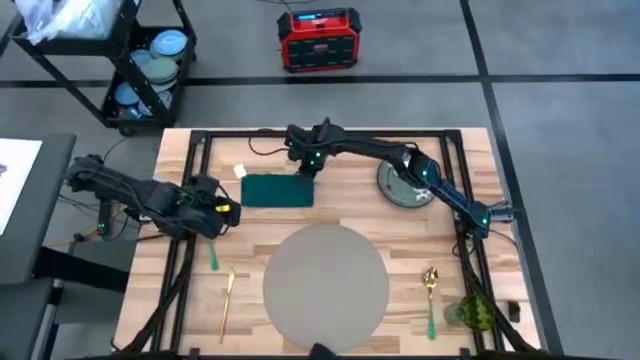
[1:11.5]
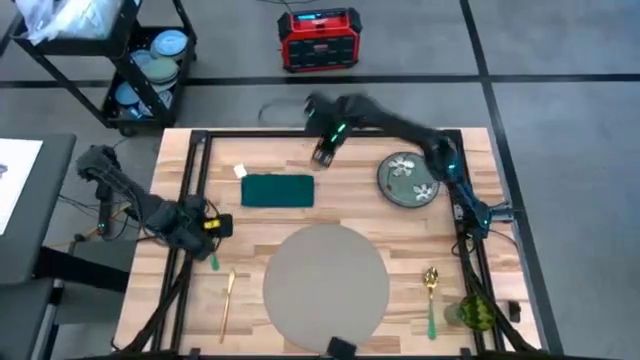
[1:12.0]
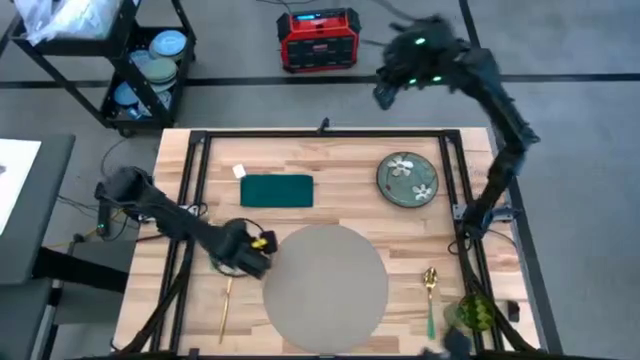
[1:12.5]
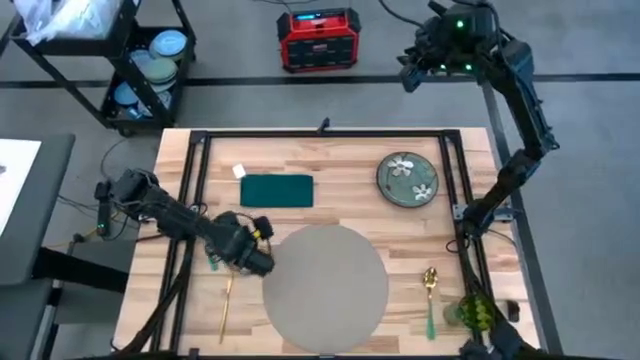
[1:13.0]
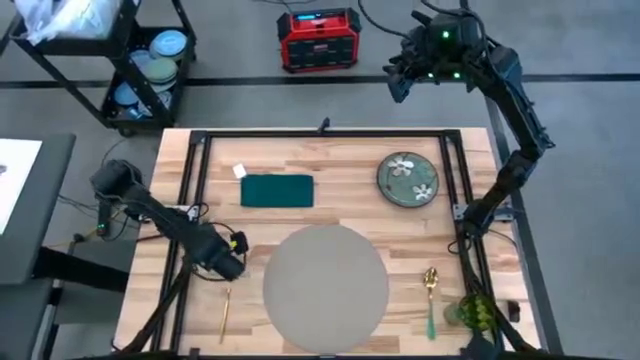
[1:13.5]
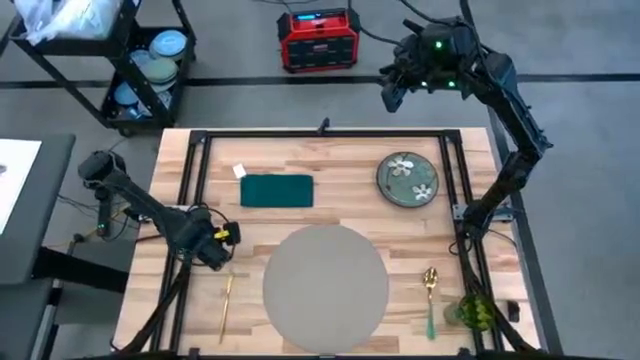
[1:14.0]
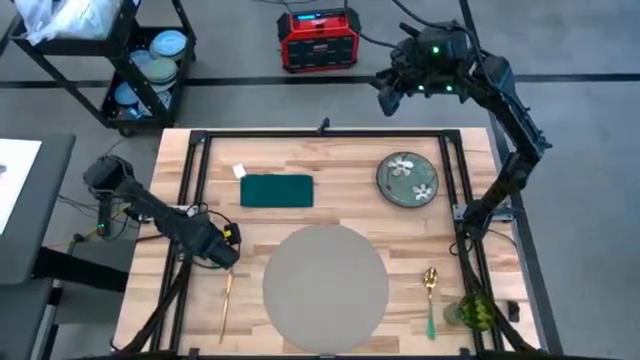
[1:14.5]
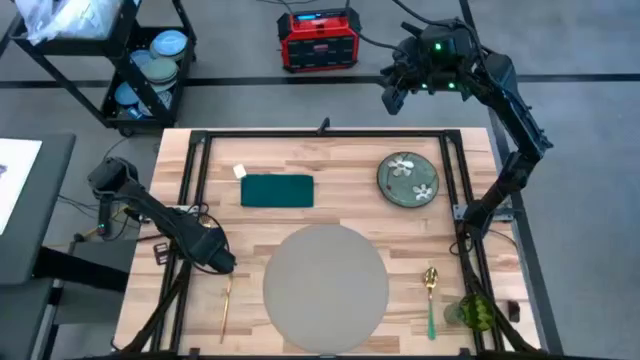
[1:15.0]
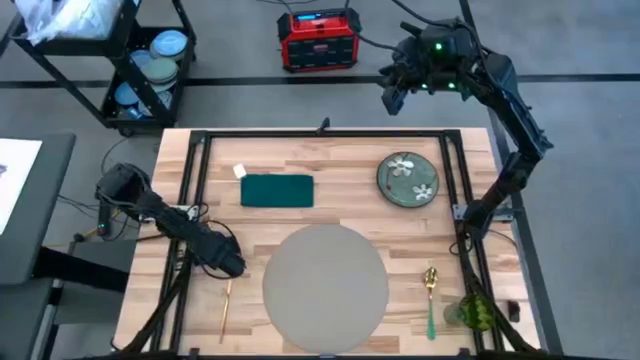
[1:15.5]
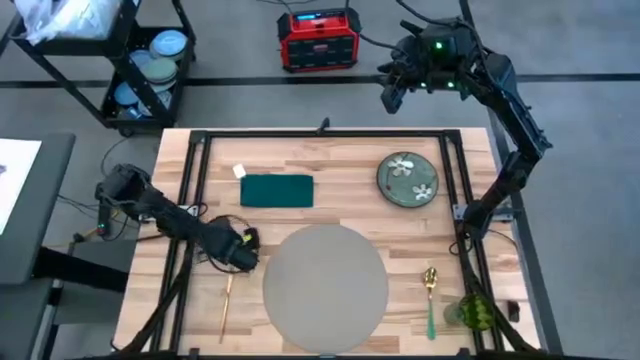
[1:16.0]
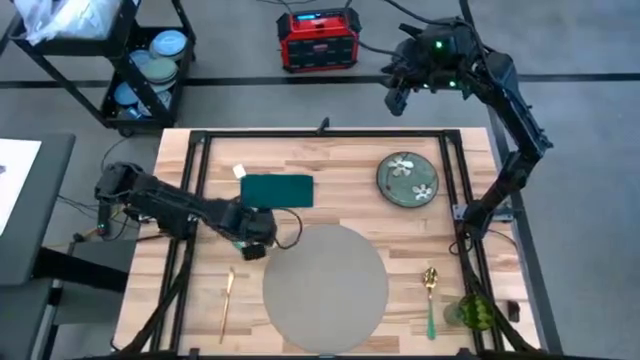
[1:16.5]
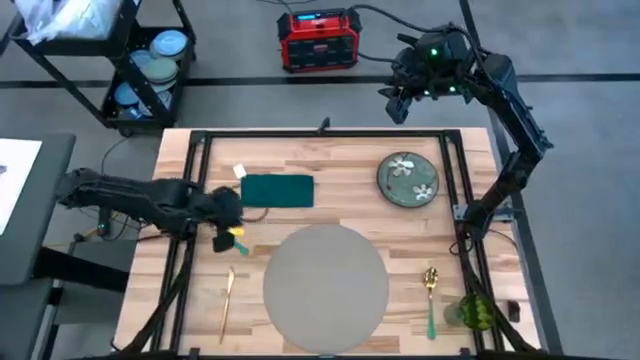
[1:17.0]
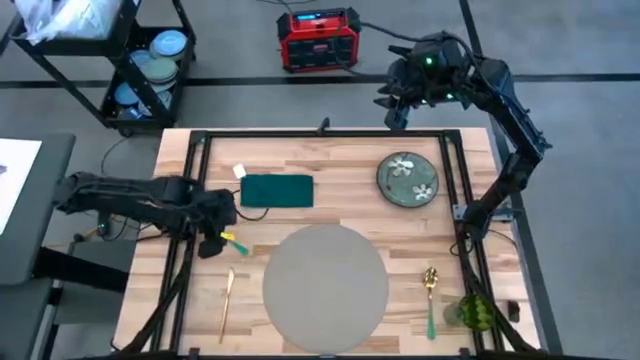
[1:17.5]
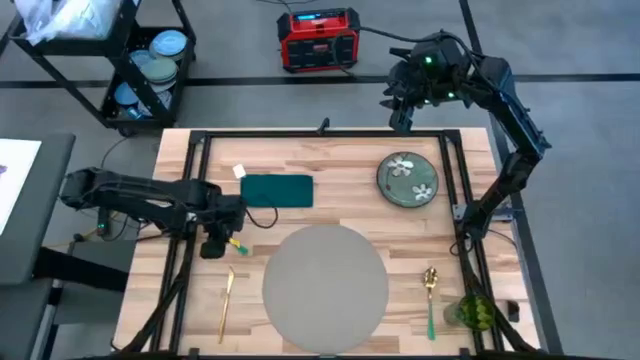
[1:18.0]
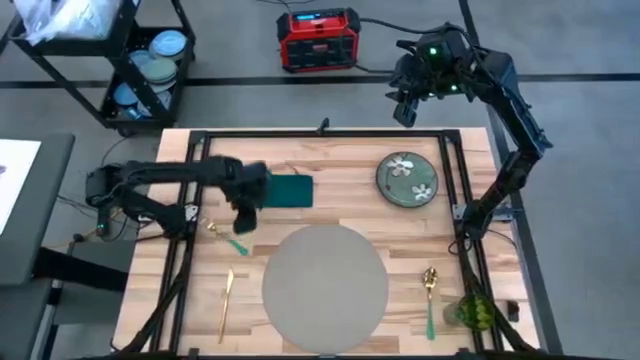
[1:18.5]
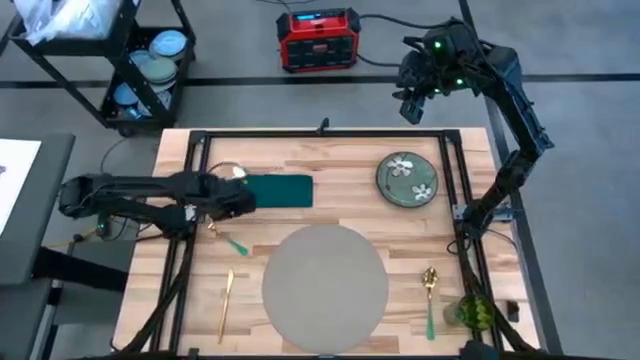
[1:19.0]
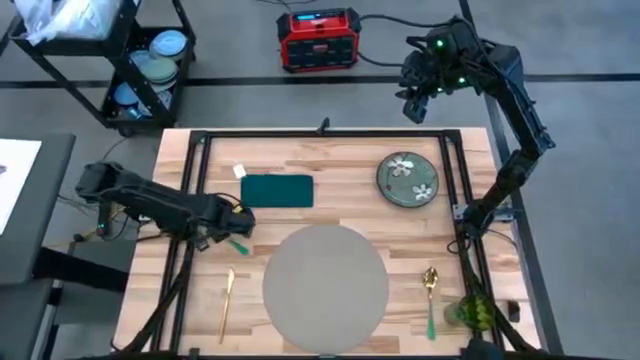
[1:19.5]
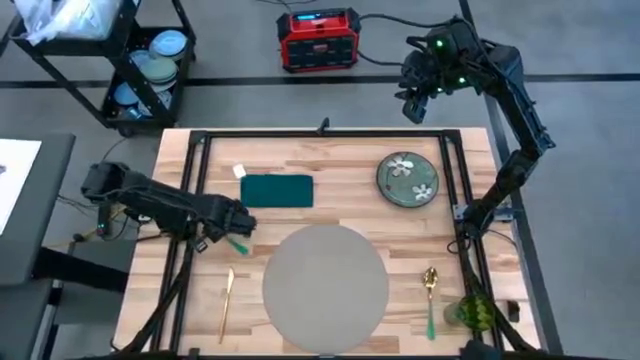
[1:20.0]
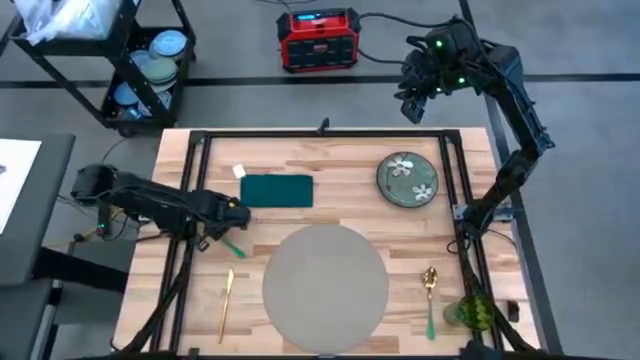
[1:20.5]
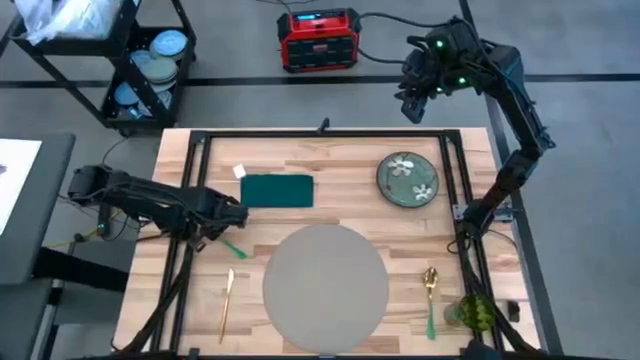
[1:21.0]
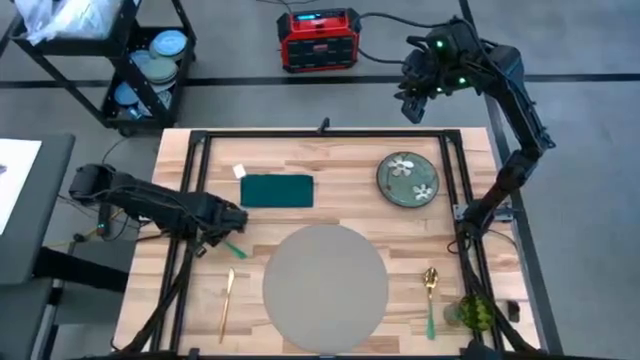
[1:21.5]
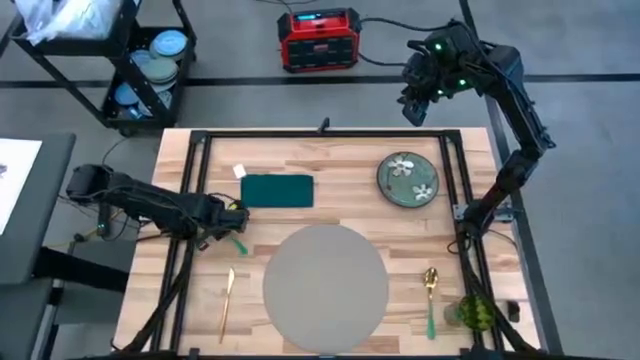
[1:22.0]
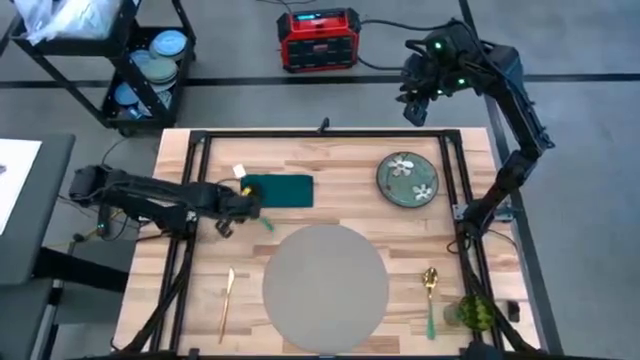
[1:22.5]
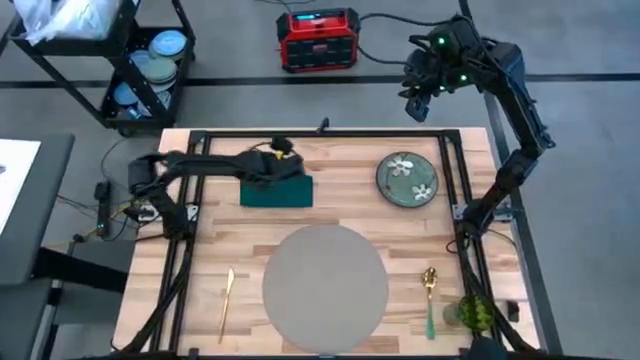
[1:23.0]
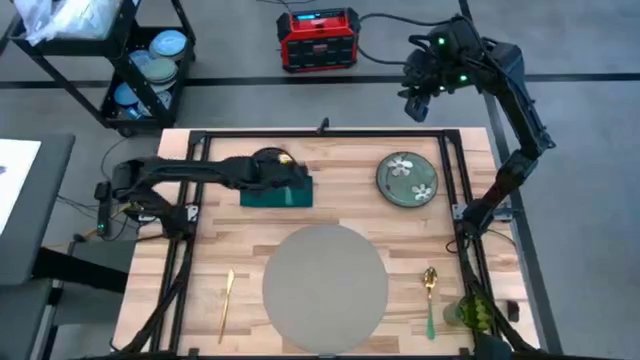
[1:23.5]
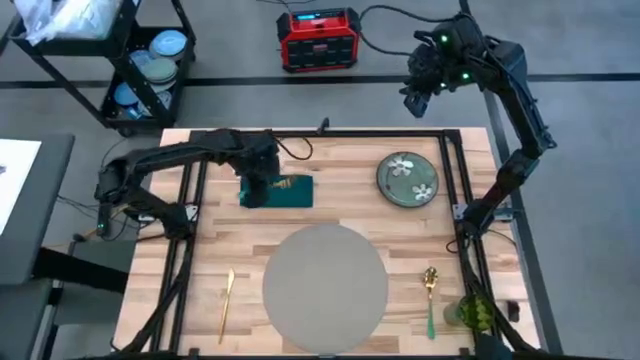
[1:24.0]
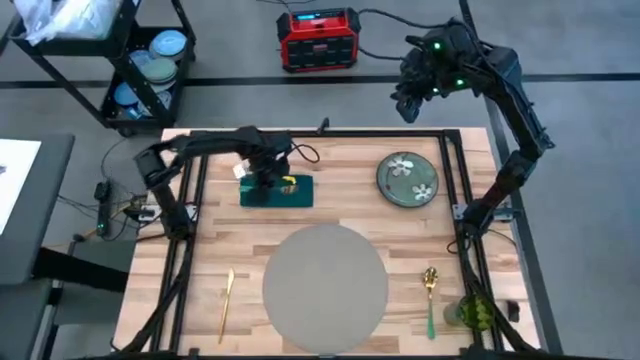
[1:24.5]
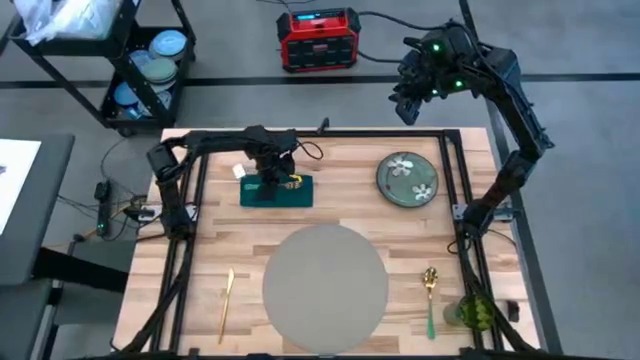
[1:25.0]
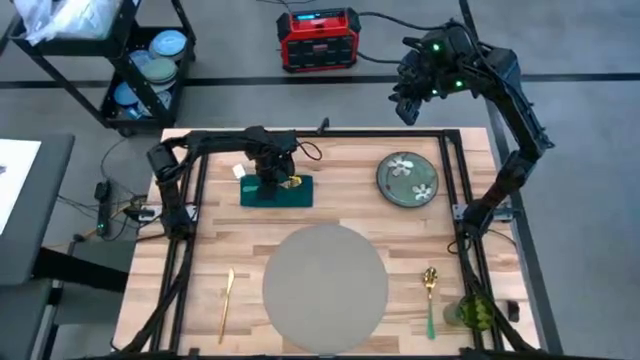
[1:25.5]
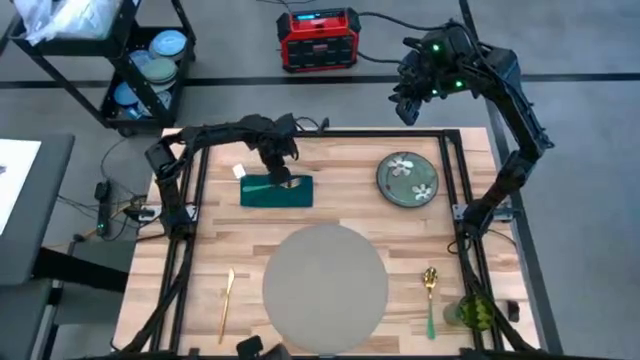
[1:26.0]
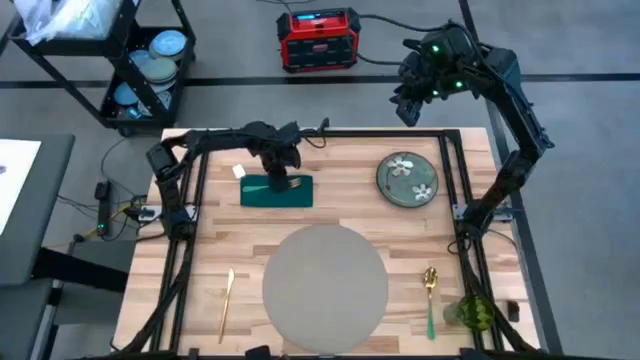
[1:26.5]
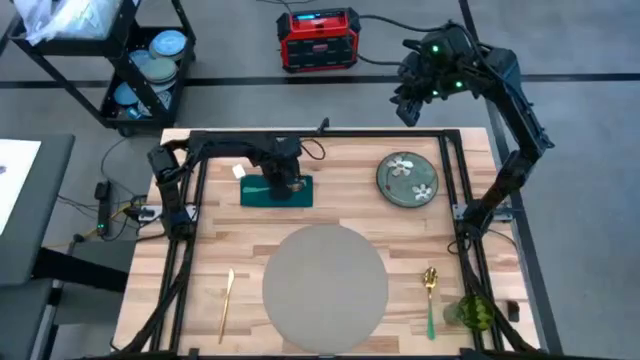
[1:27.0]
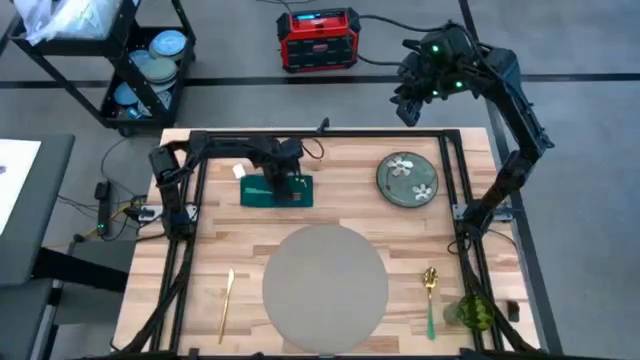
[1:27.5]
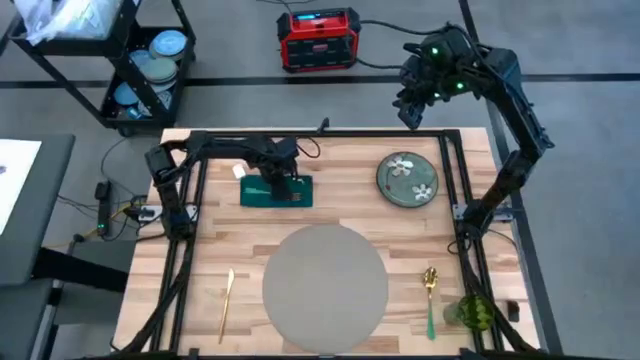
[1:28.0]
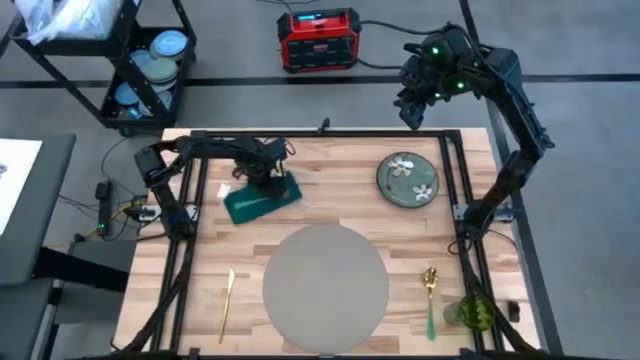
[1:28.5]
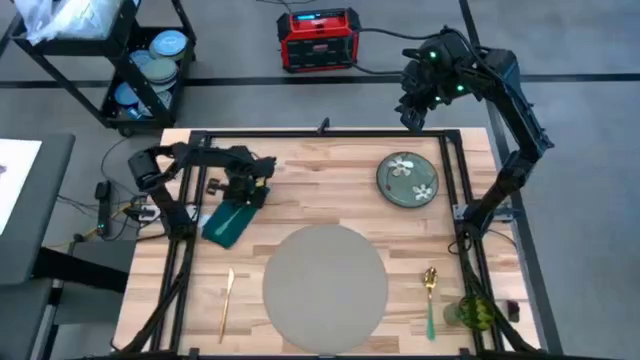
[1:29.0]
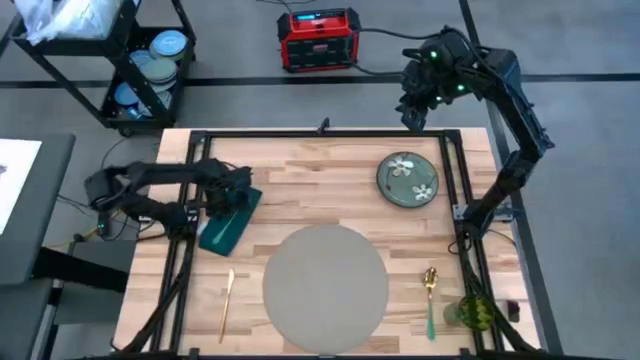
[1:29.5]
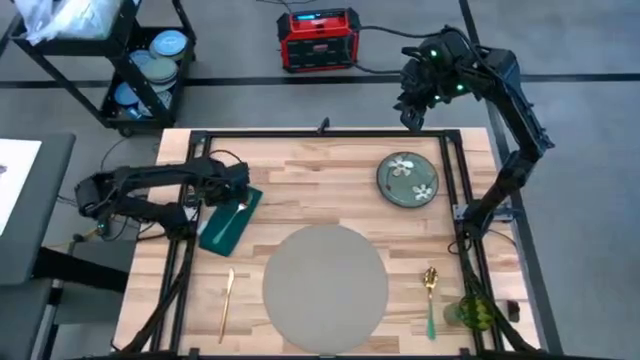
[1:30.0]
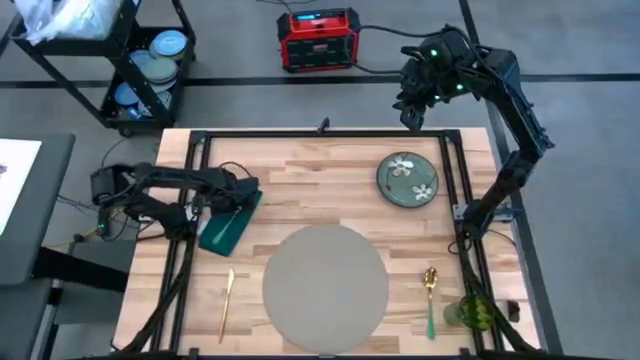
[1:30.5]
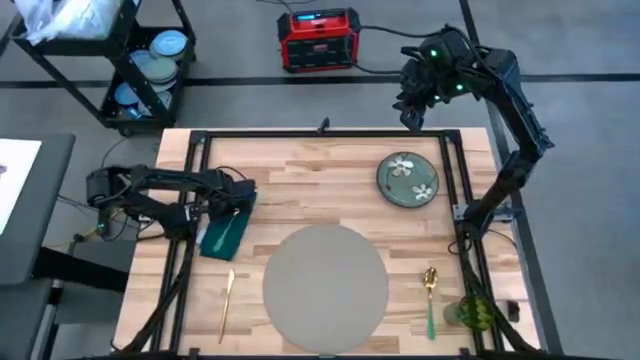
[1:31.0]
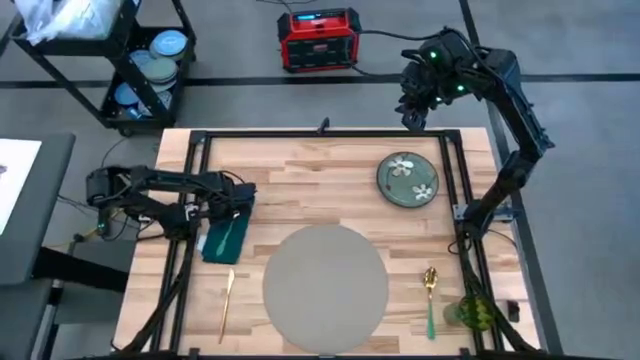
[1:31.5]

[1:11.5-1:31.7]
Task: Set table place
Put the green fork on the green napkin

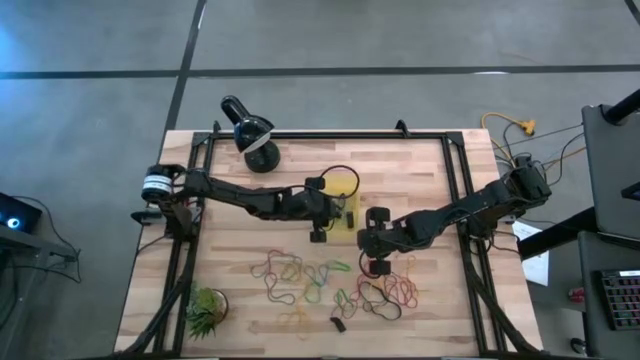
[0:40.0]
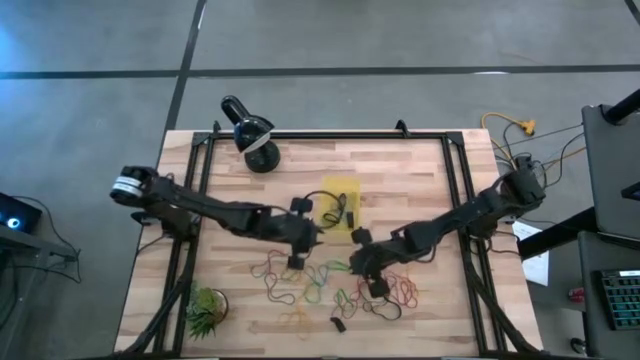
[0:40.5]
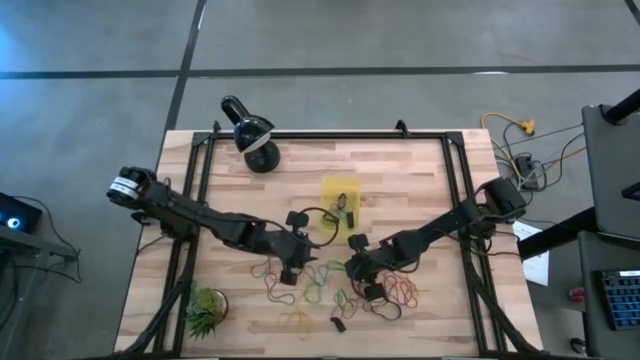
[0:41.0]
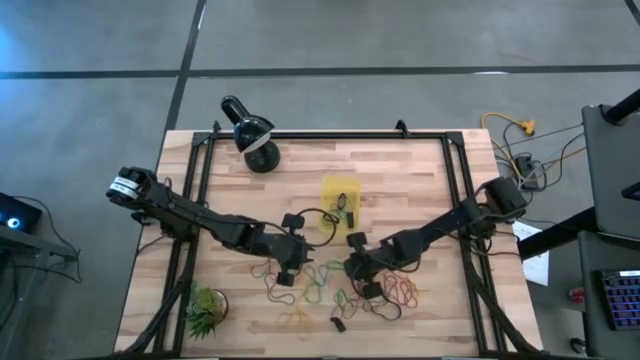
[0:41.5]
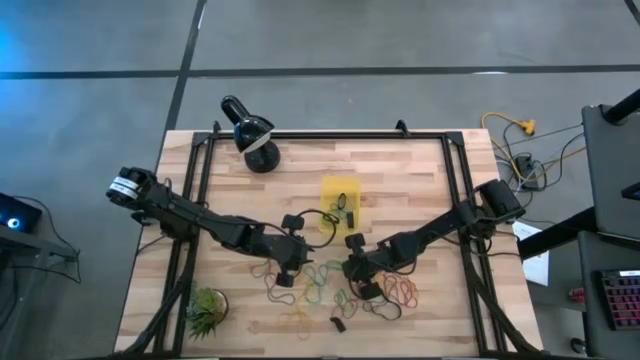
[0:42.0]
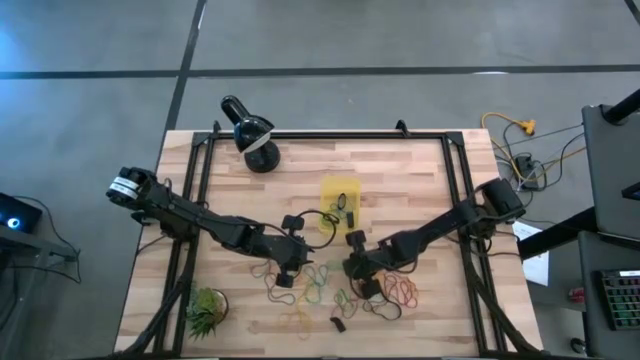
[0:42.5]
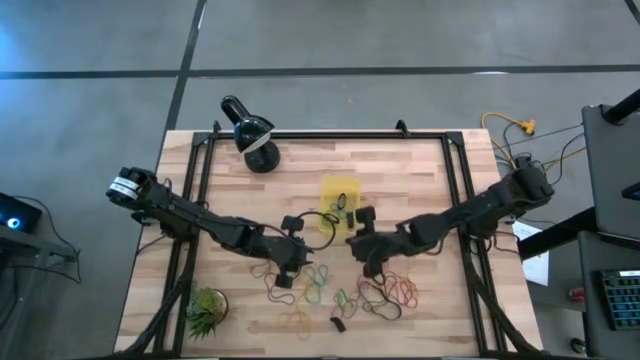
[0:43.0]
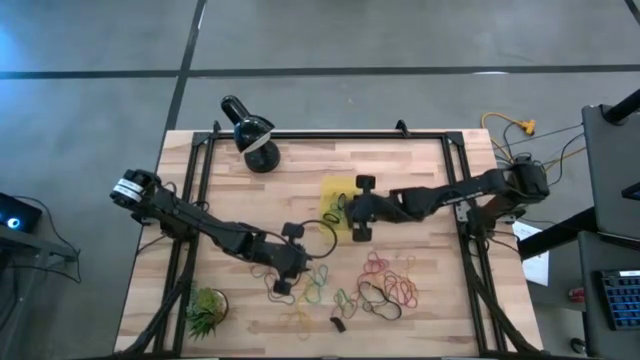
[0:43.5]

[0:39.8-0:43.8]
Task: Pick and place rubber bands into bin
Put the green rubber band into the yellow bin
